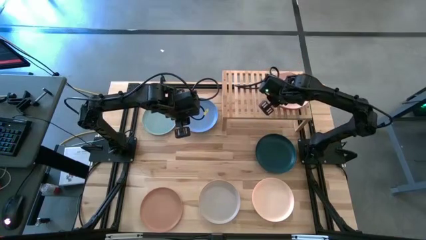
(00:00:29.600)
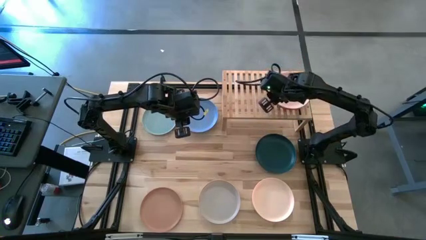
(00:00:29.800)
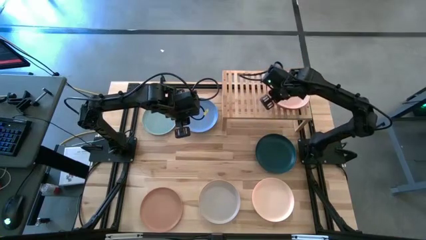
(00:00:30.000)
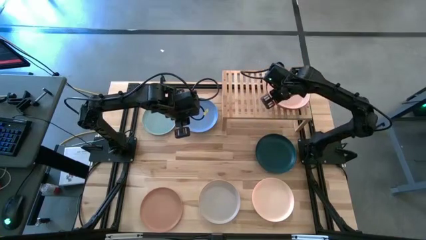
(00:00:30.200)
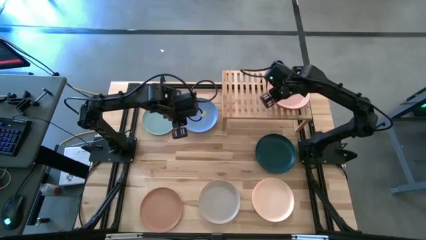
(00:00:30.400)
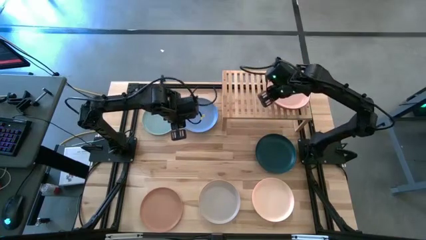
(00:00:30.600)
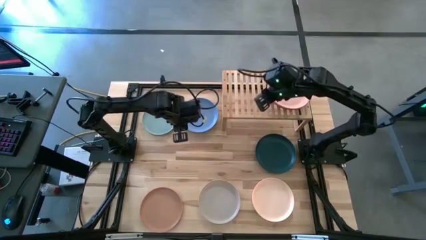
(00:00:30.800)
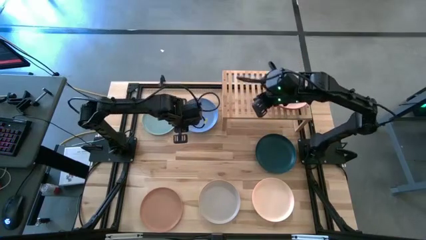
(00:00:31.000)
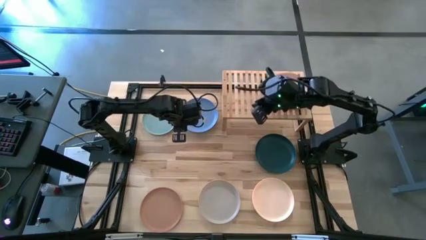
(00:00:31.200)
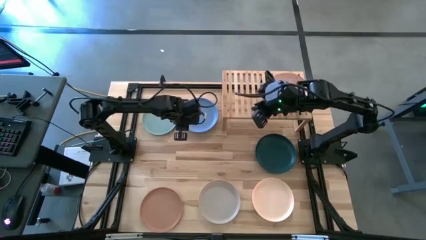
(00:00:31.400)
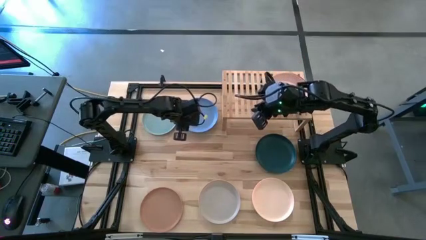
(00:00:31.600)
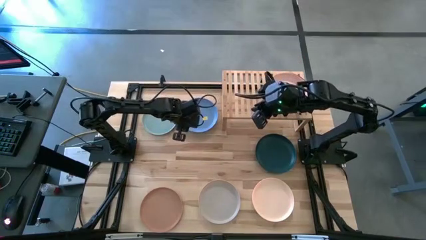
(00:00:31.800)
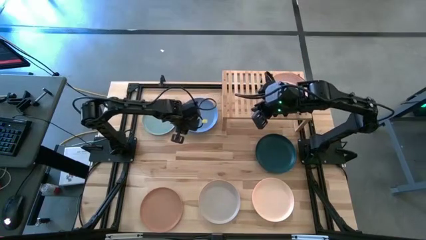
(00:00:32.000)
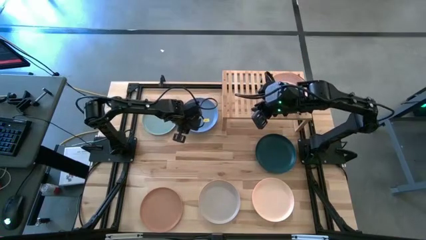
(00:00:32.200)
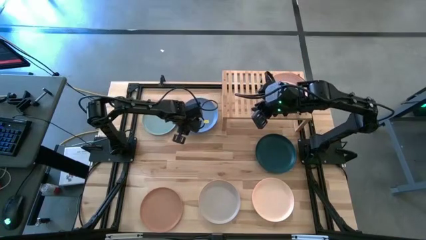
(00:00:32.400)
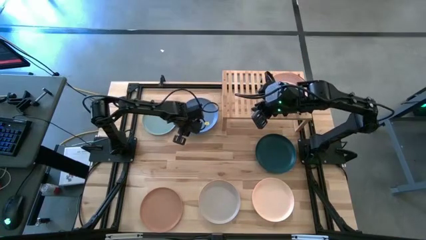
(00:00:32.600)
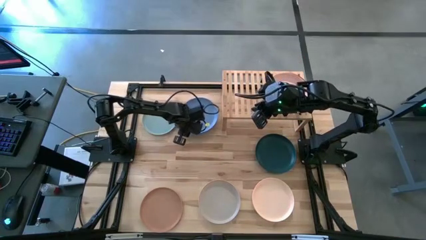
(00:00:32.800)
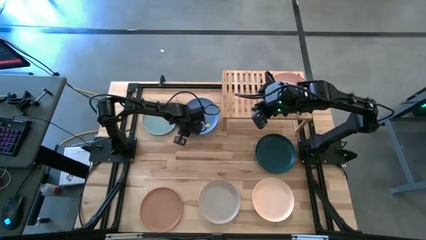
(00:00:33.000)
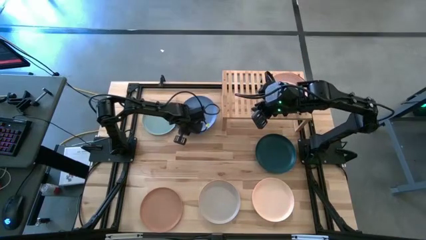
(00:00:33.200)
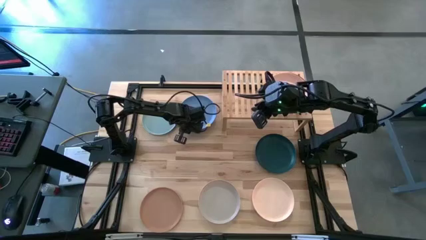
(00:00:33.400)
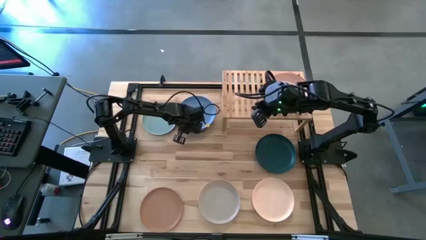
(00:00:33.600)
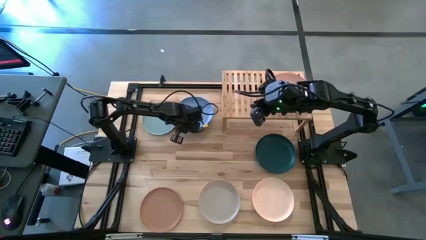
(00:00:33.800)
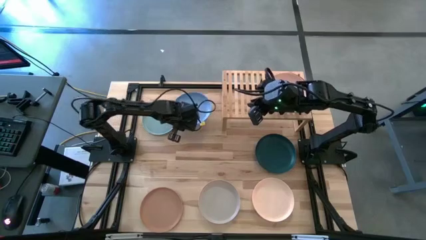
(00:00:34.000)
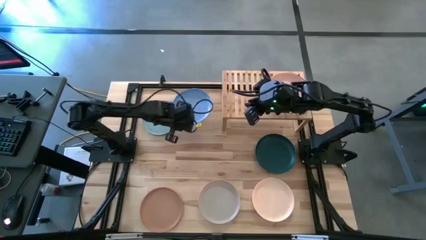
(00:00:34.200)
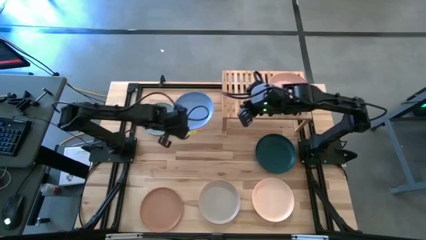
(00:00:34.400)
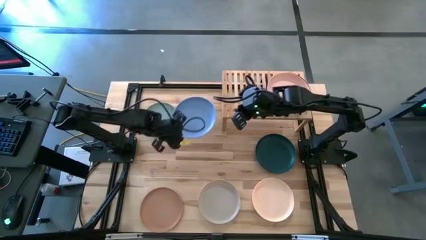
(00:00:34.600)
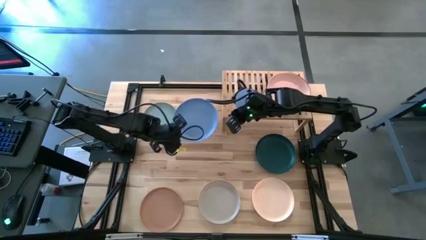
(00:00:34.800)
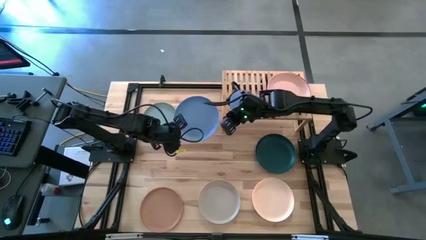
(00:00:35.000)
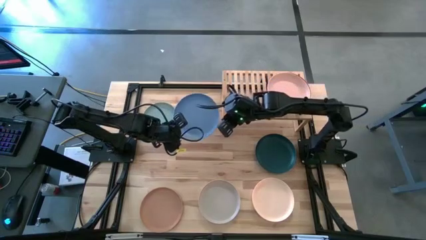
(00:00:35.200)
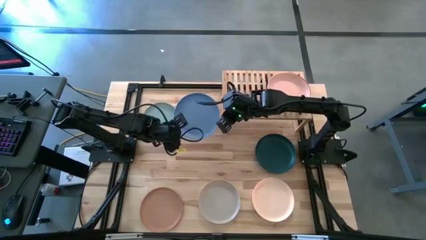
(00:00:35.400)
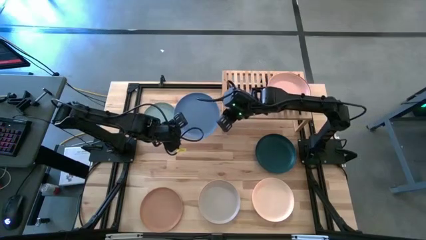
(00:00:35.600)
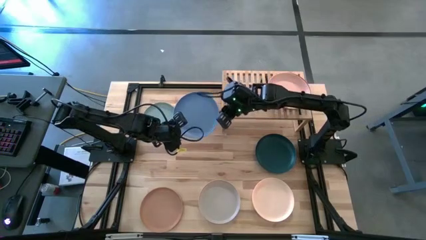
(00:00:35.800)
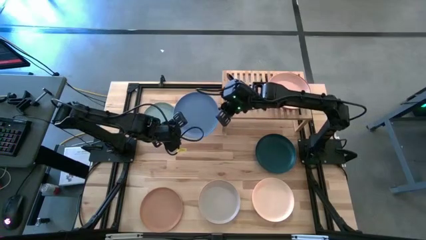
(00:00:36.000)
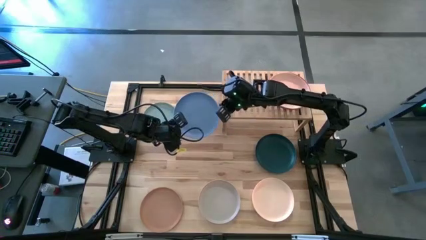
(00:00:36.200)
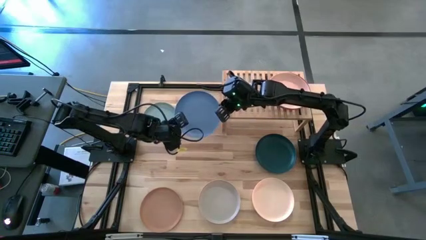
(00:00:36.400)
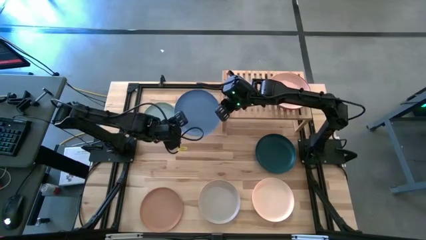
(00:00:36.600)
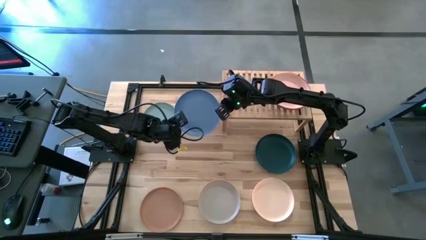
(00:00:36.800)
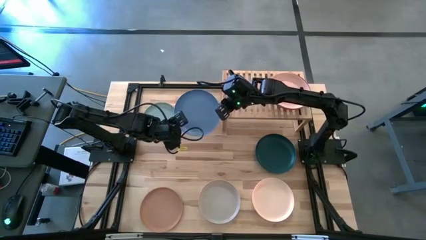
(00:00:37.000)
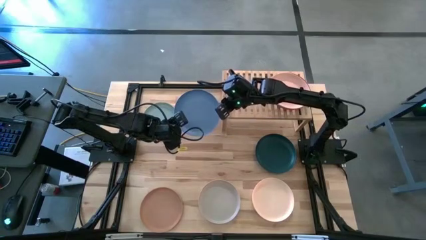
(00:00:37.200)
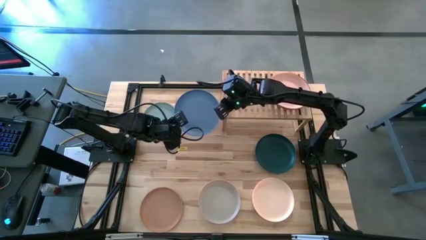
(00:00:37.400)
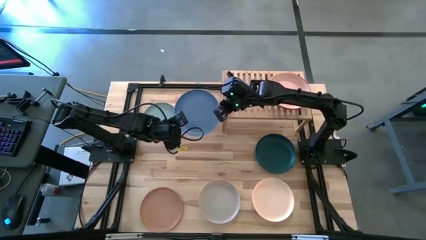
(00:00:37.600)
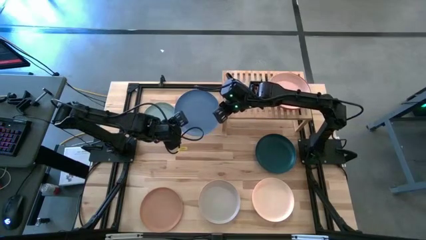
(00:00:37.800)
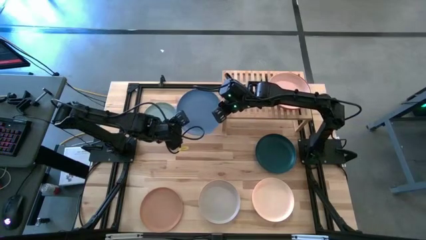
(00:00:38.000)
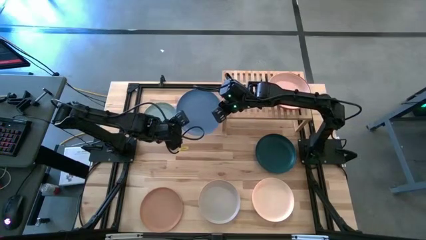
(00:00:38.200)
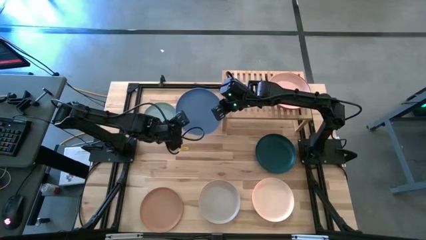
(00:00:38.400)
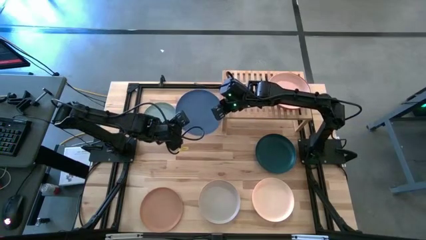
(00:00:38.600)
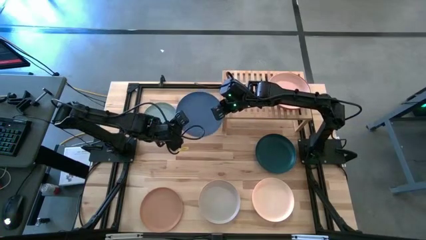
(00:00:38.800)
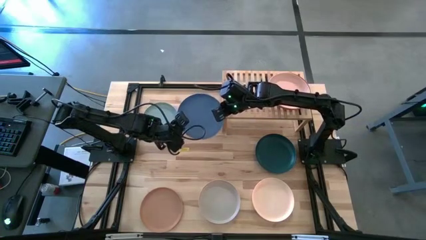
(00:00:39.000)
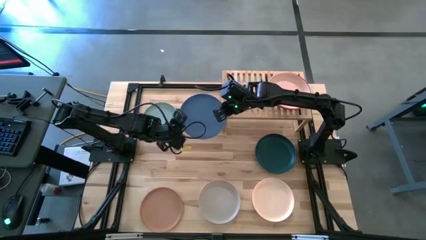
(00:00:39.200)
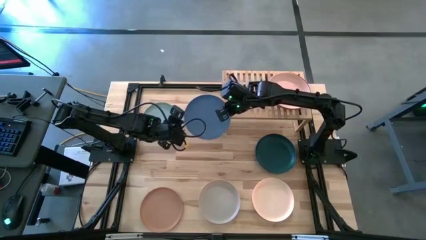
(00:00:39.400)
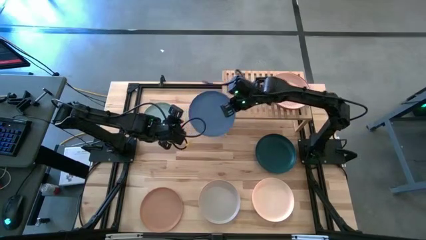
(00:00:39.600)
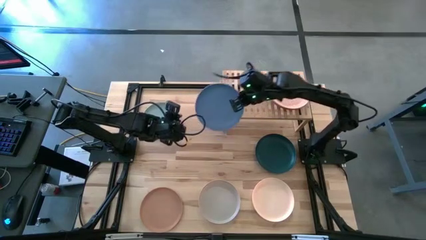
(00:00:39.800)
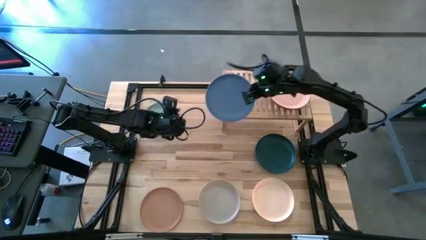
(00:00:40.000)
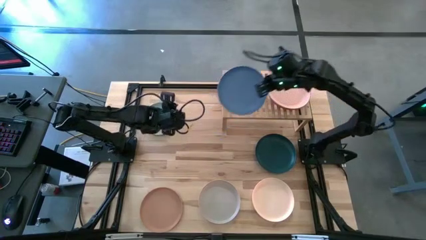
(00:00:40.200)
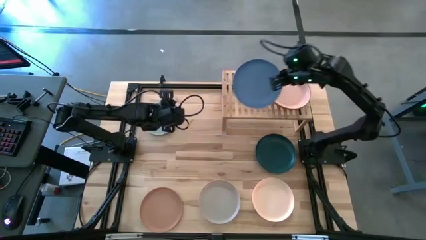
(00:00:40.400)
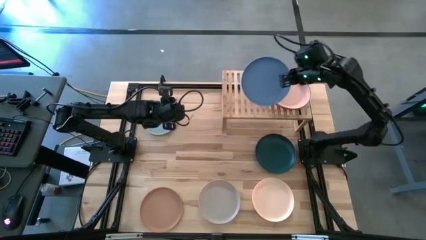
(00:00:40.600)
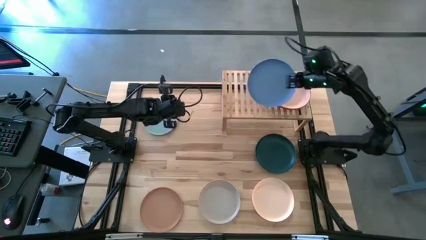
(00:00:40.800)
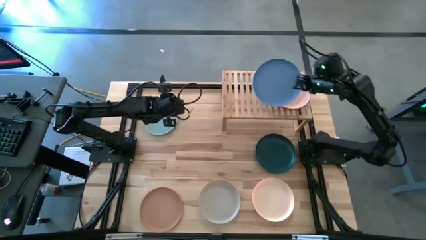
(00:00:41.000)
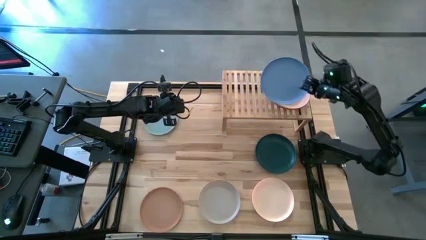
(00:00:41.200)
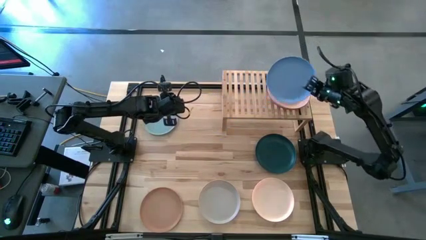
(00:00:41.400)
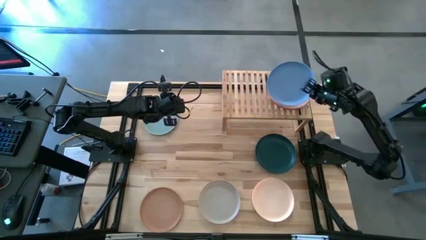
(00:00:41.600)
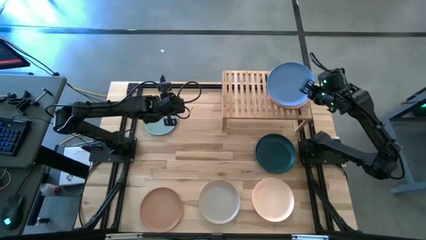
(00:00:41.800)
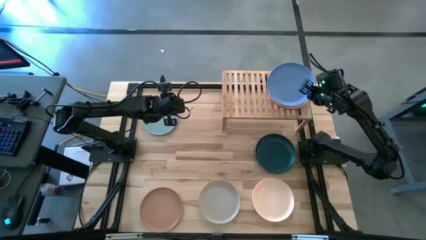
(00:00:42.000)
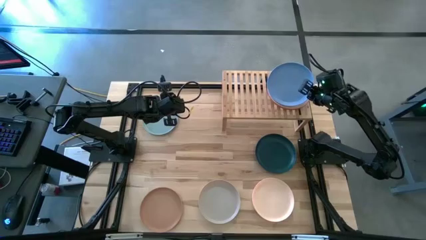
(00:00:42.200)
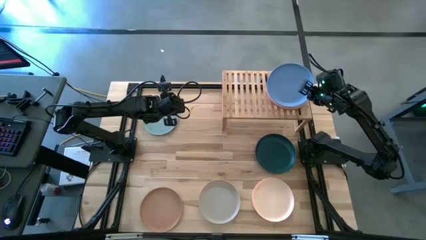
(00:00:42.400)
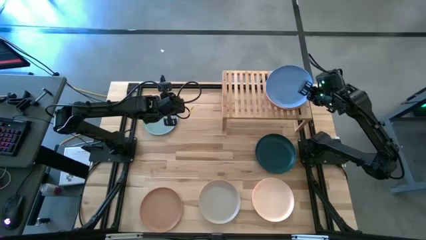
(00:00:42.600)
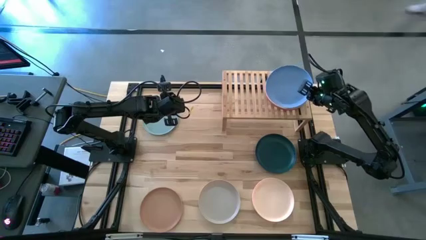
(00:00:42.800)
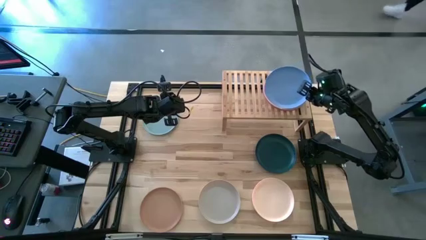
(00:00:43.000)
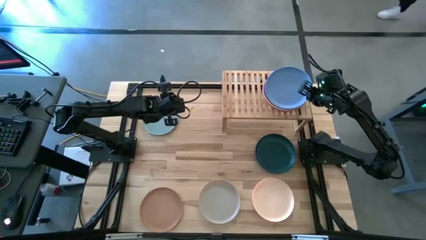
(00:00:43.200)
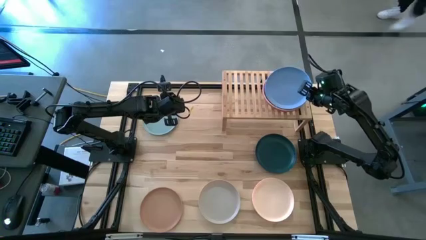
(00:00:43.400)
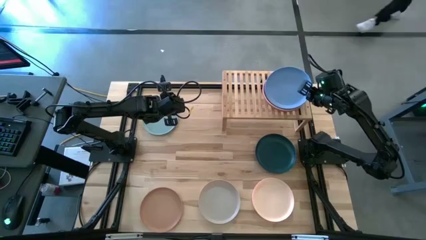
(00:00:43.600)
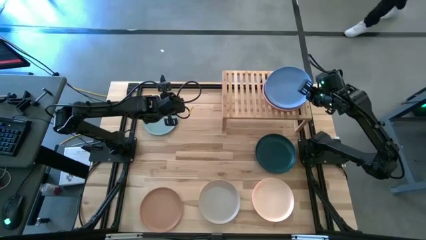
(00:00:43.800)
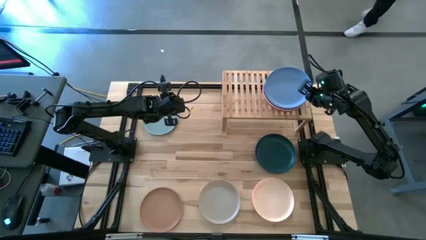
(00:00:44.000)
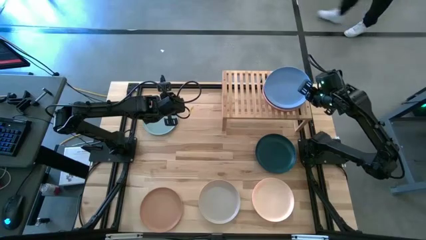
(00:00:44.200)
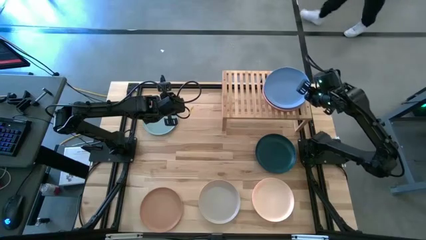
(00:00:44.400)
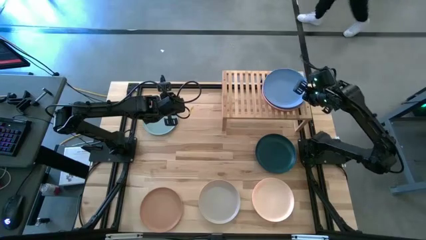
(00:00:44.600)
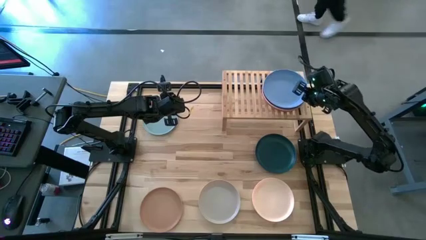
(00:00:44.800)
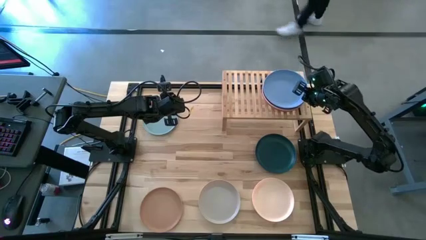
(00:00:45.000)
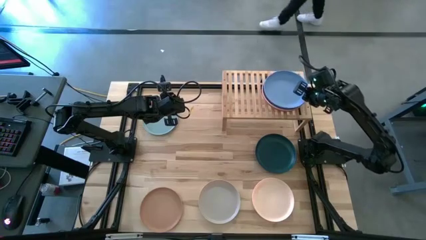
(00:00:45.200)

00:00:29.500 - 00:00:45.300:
Task: Place and stack plates onto a shelf
Stack the blue plate on top of the light pink plate onto the shelf
